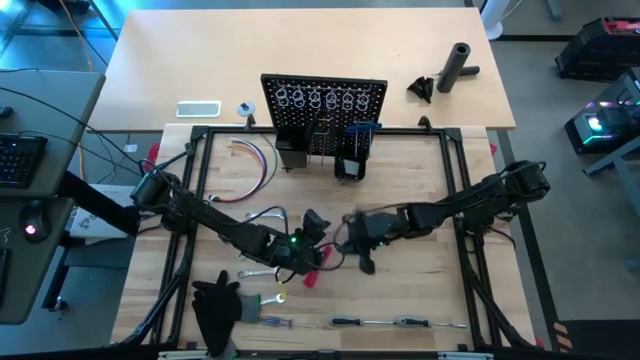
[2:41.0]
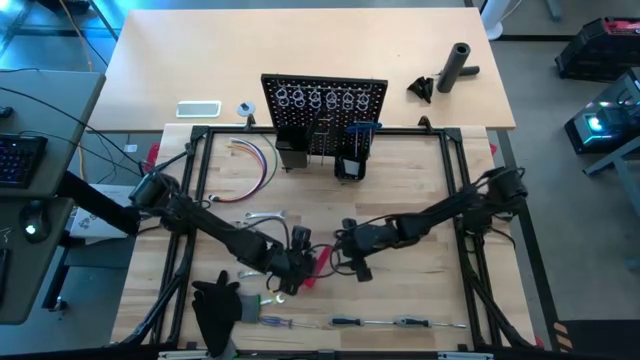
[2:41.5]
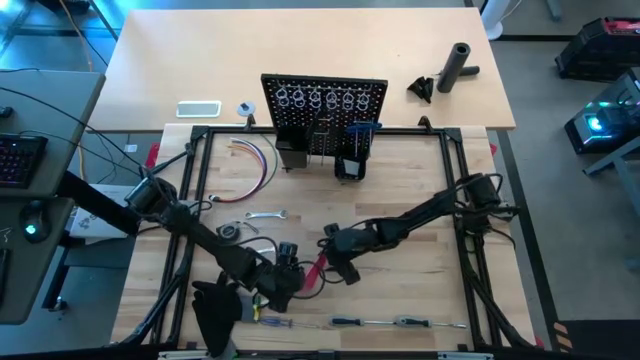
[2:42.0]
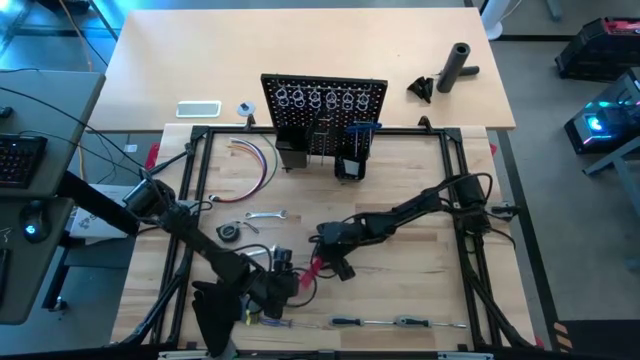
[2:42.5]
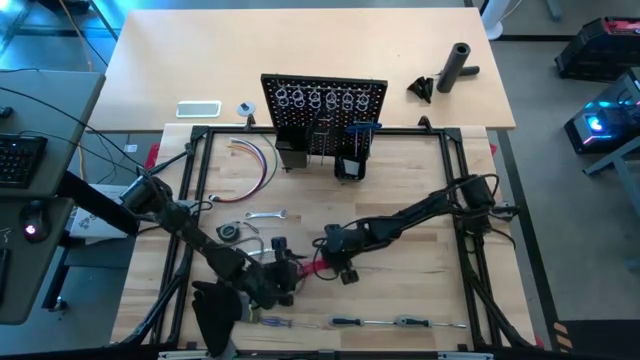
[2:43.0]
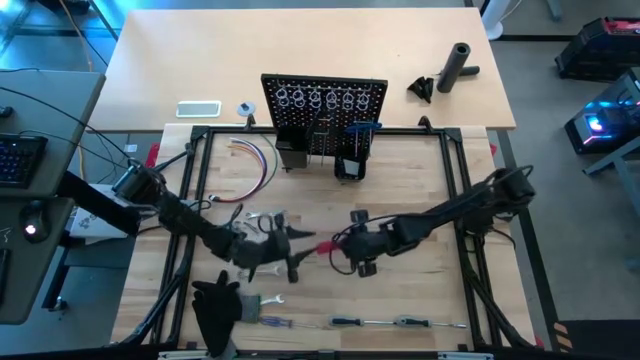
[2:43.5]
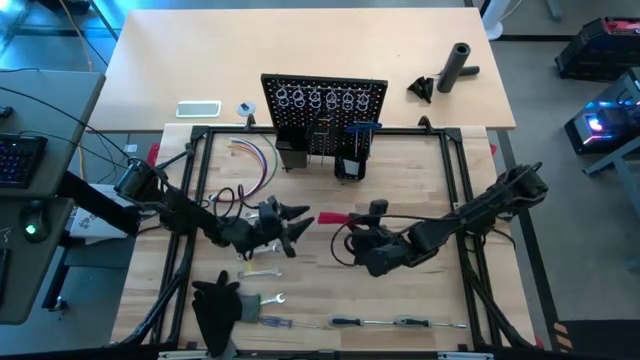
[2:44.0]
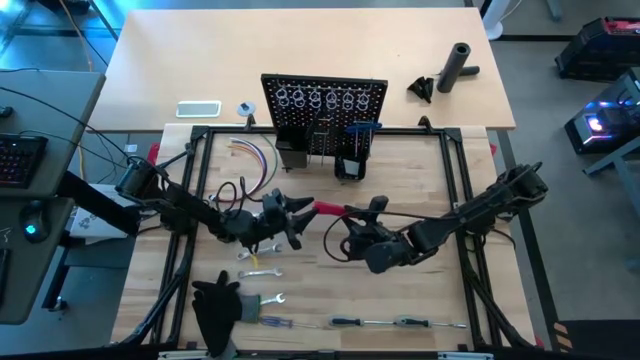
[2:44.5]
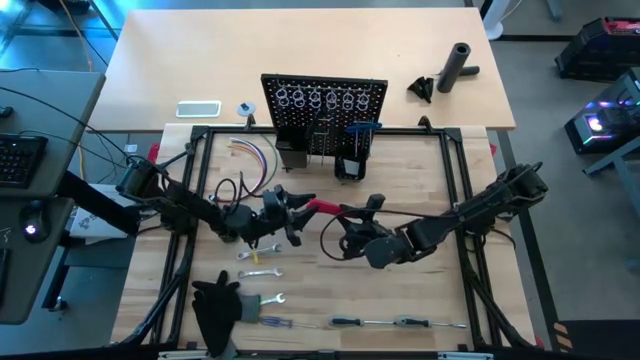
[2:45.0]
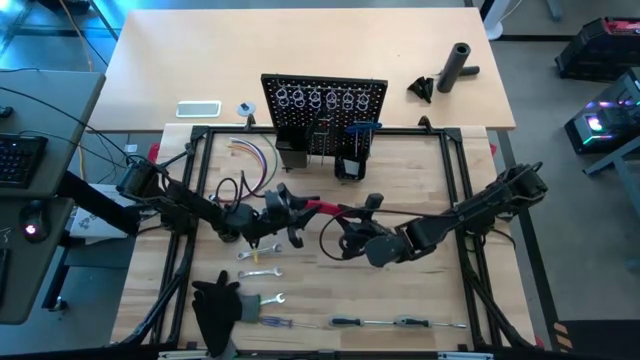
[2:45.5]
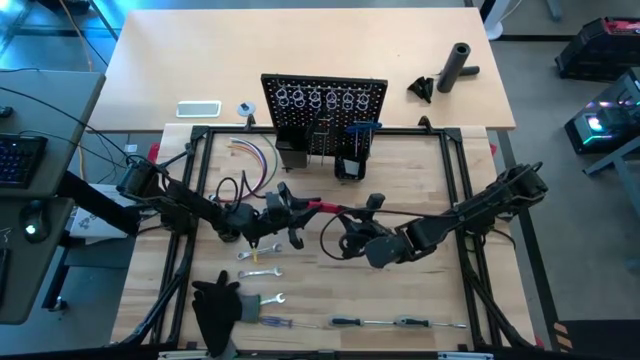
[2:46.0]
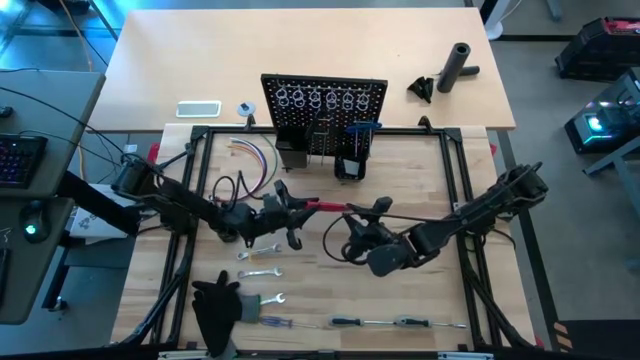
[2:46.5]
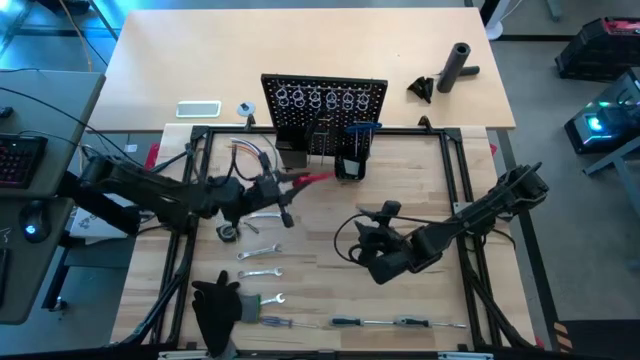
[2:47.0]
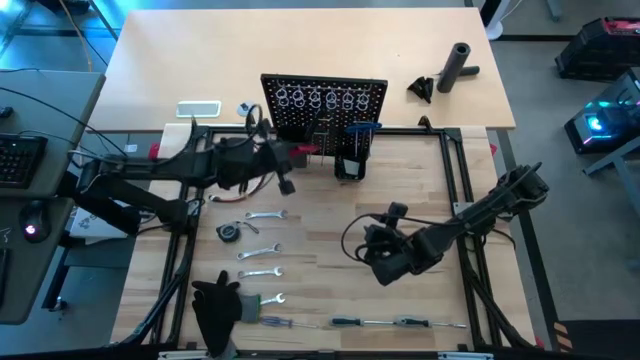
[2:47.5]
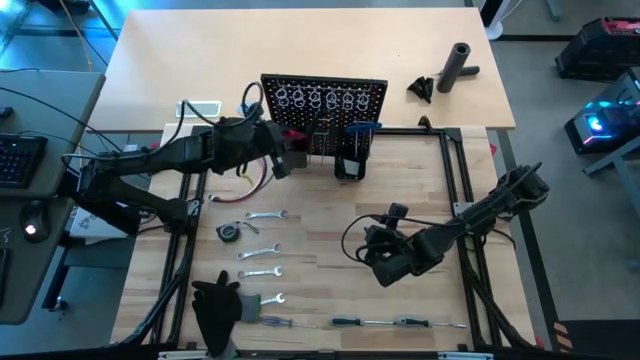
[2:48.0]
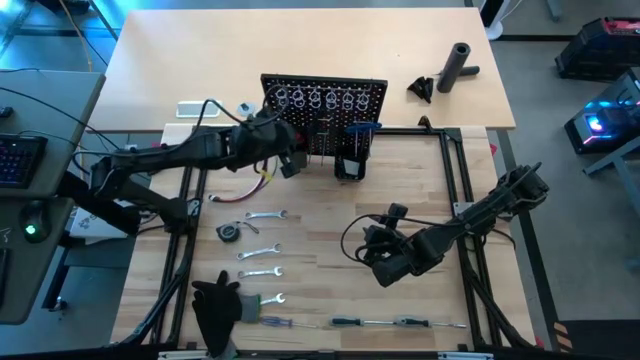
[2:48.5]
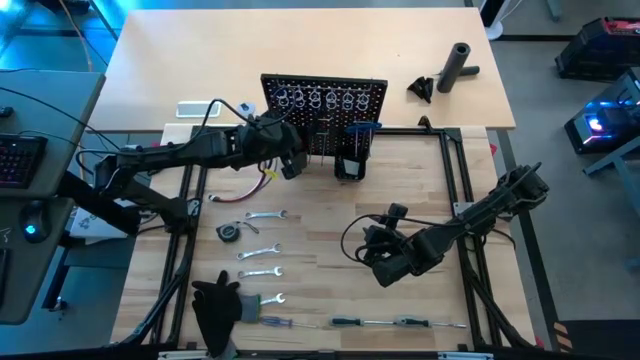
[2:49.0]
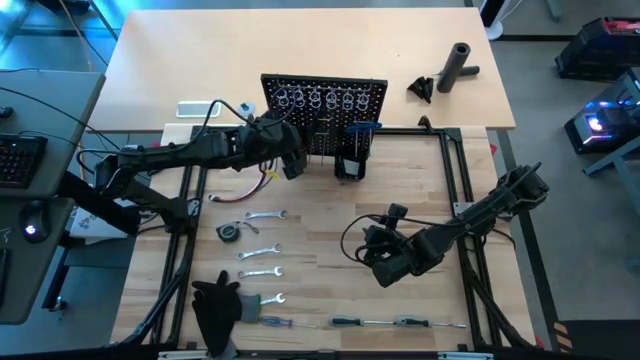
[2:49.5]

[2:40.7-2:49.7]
Task: Hang tools onto peg board
Put the red cutter into the big black bin on the black pegboard

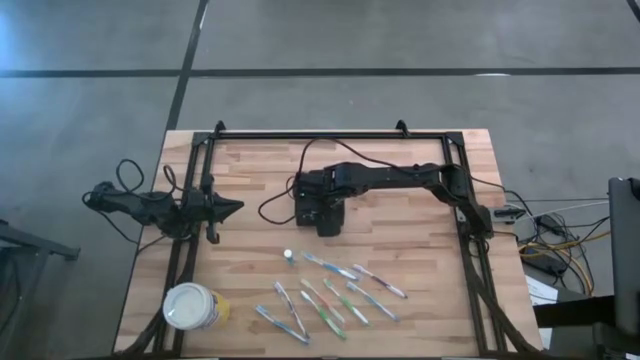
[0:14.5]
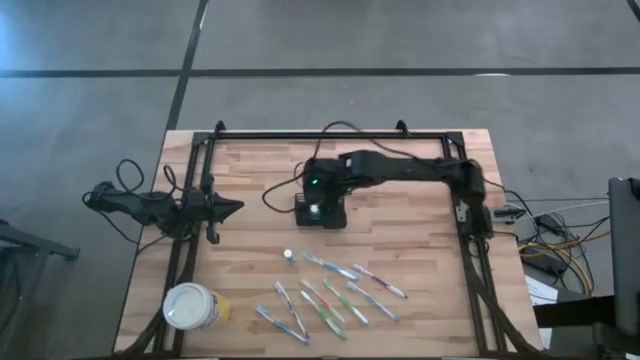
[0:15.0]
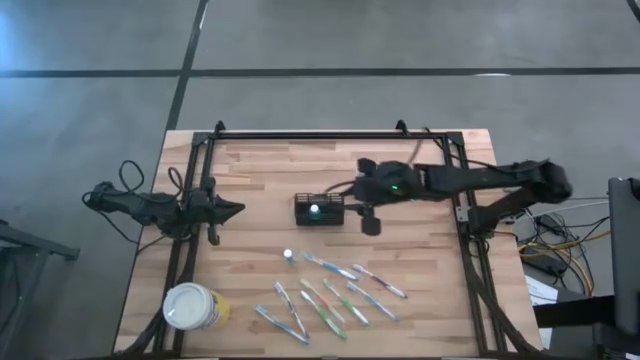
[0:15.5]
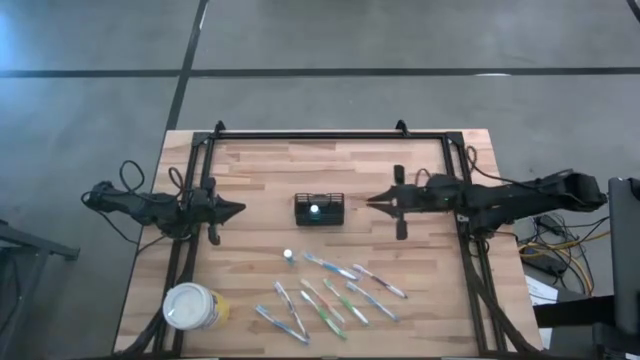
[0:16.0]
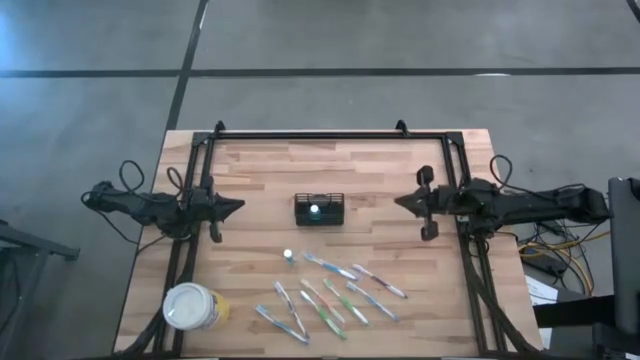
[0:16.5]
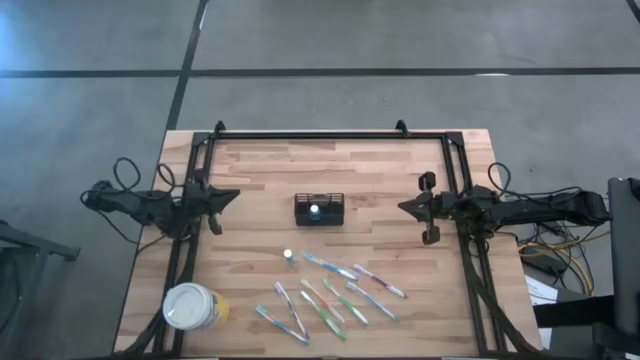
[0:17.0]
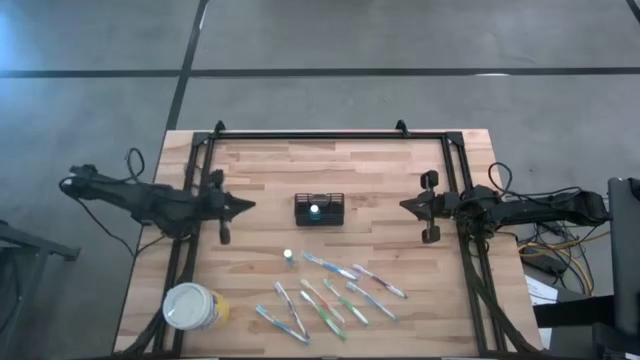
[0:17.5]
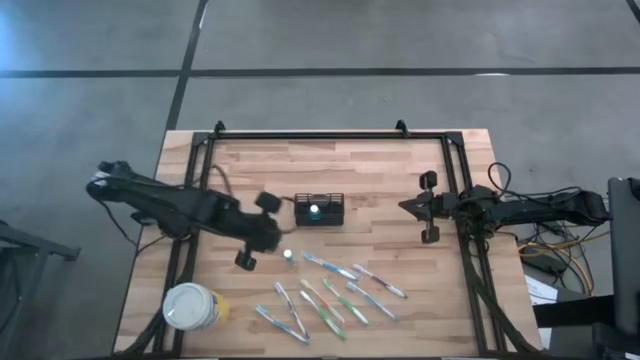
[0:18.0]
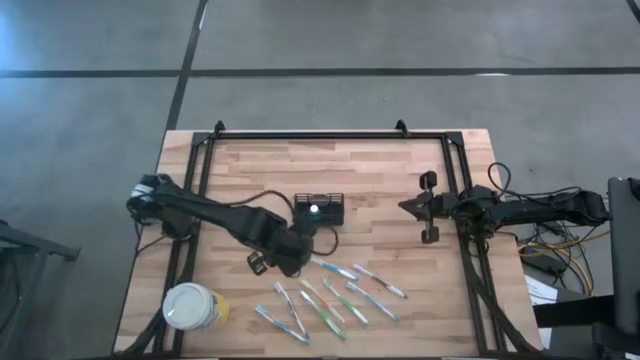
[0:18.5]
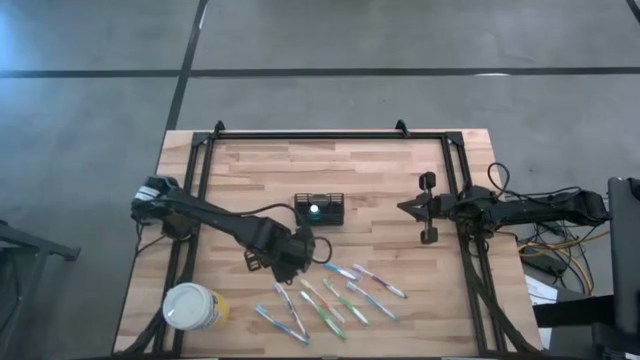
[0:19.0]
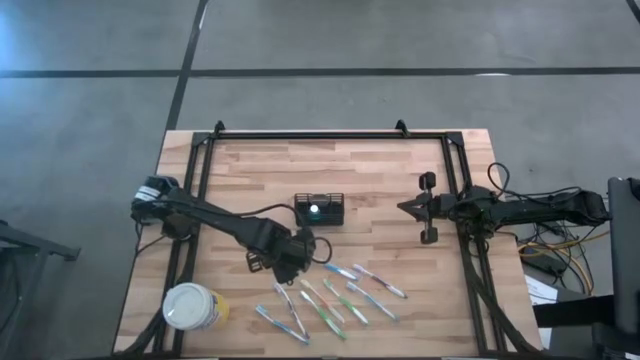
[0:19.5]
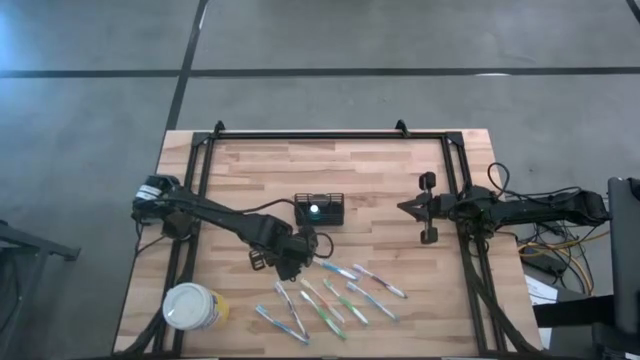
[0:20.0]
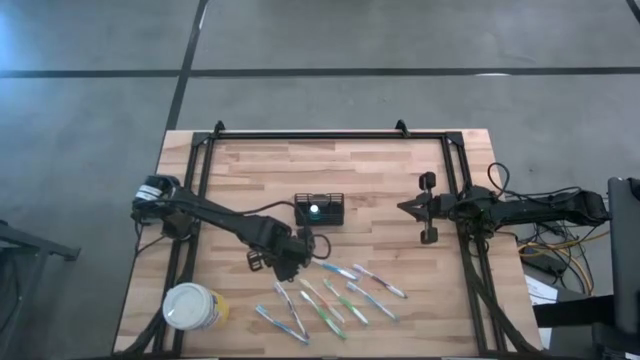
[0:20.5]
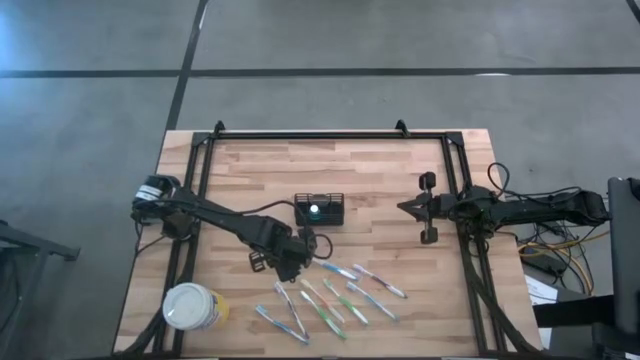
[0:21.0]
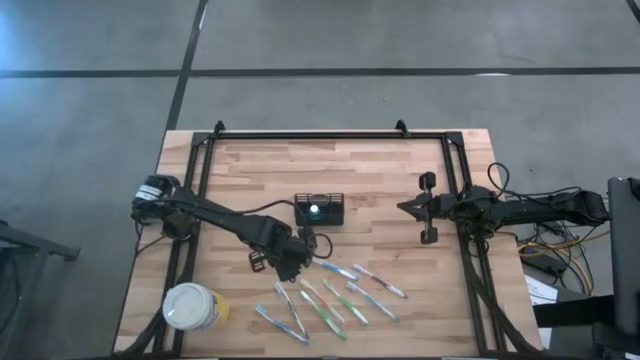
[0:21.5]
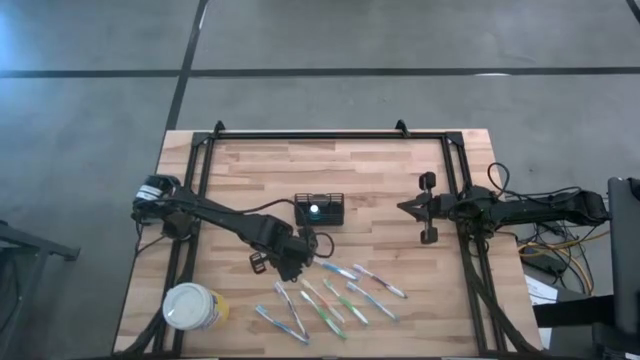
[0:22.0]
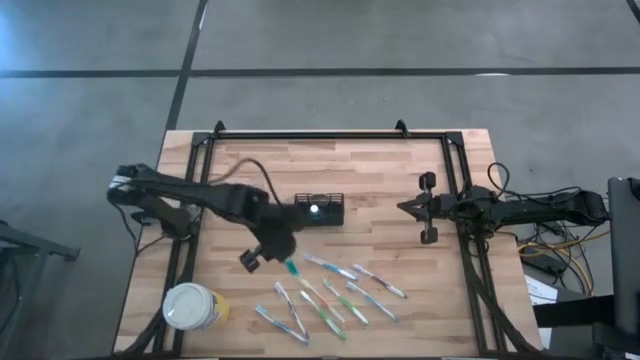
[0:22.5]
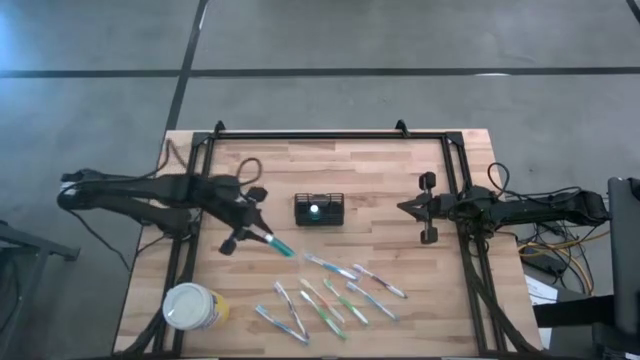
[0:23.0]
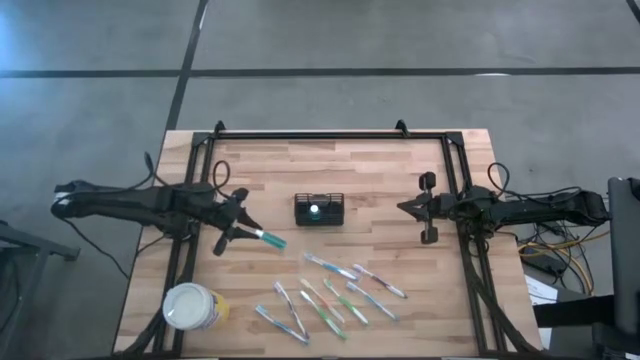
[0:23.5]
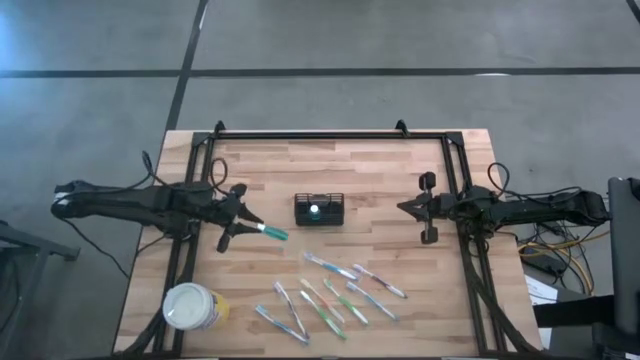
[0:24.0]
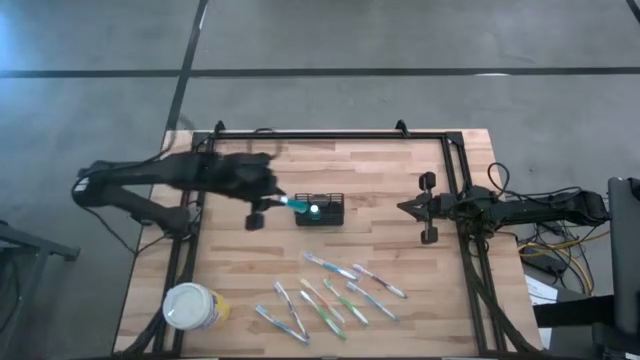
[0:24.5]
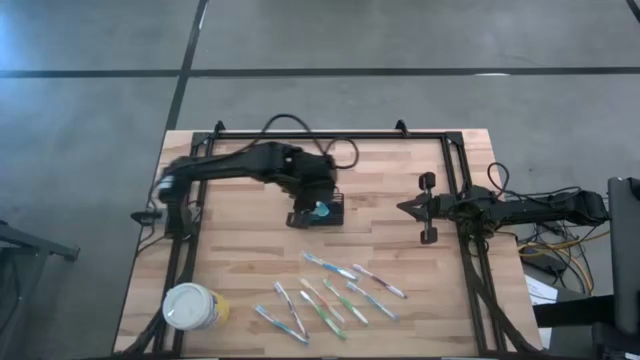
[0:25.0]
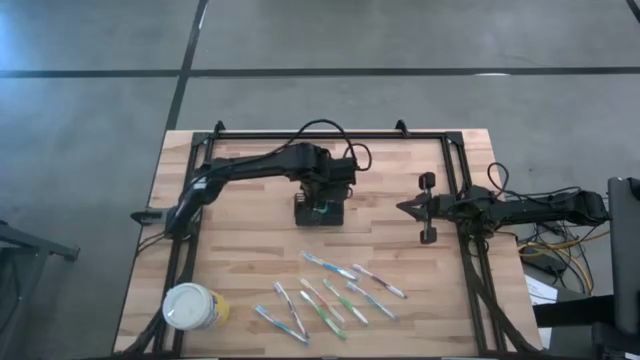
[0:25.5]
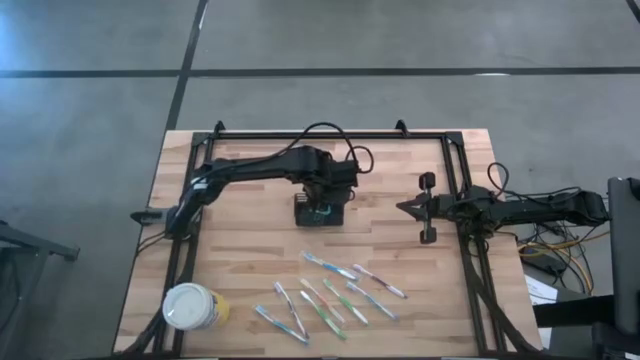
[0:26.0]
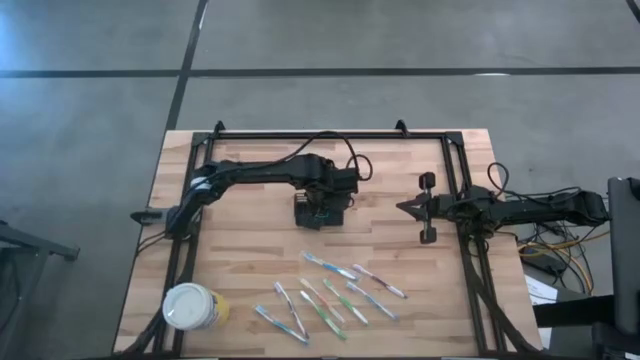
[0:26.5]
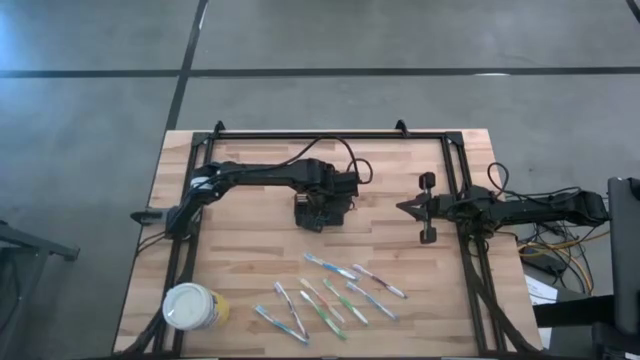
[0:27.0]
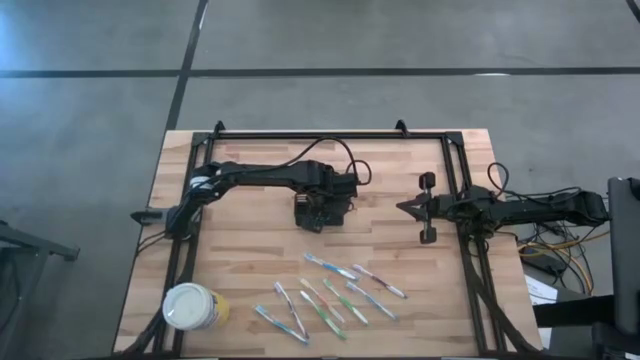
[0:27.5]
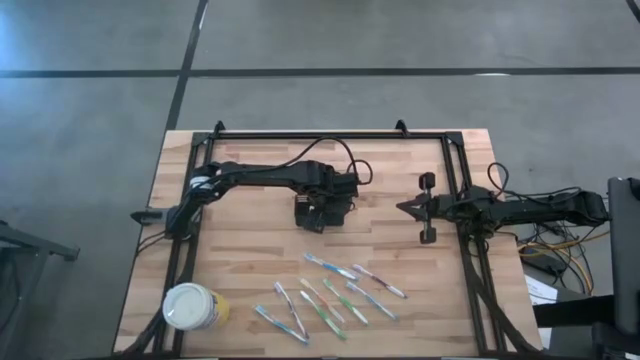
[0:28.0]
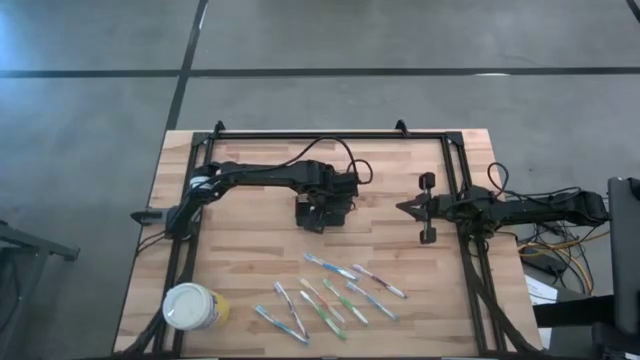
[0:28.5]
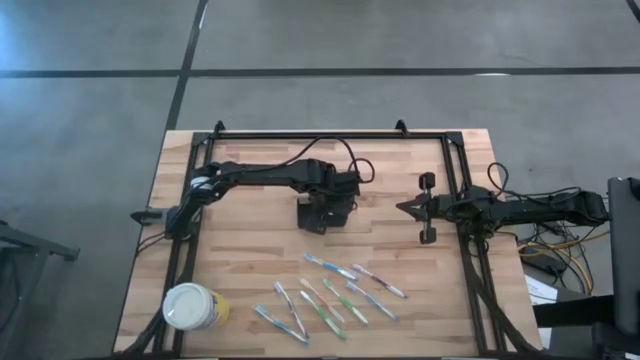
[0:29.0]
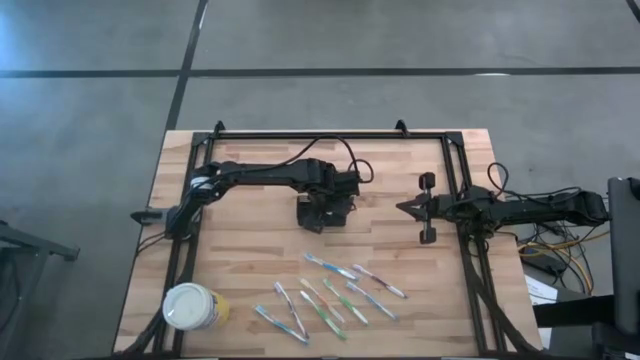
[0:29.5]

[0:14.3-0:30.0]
Task: Pick & Place toothbrushing station
Put the blue mouthwash into the black wire organizer
